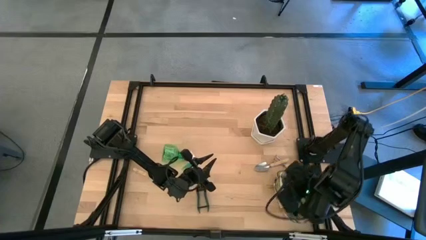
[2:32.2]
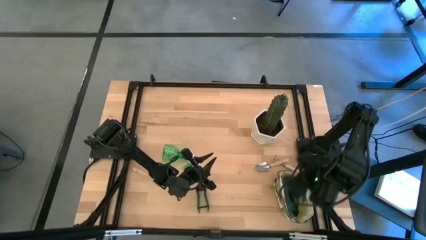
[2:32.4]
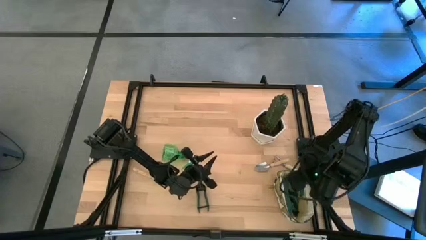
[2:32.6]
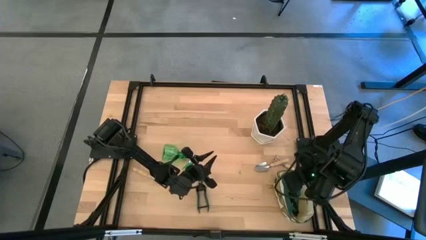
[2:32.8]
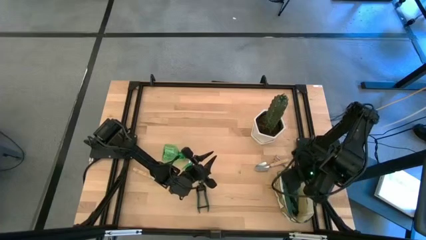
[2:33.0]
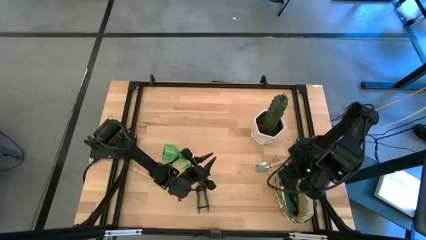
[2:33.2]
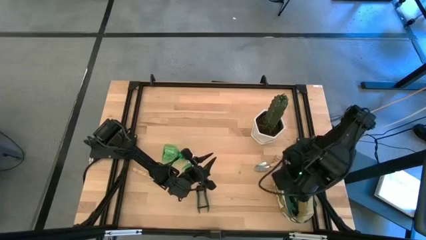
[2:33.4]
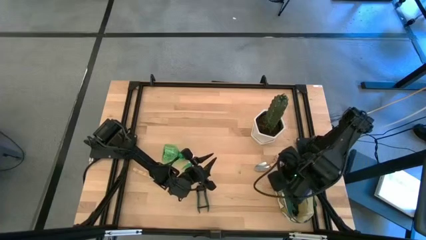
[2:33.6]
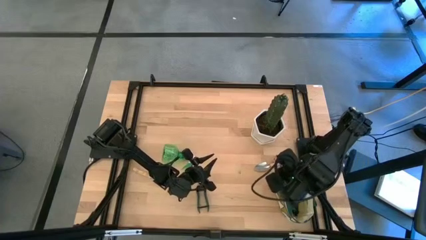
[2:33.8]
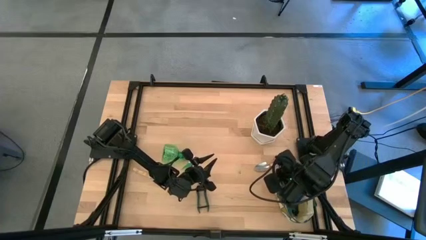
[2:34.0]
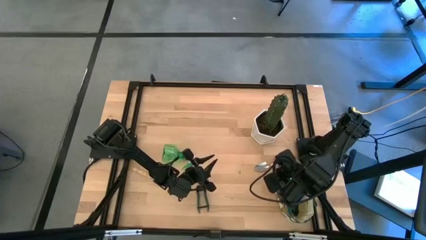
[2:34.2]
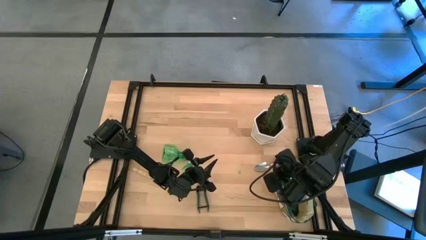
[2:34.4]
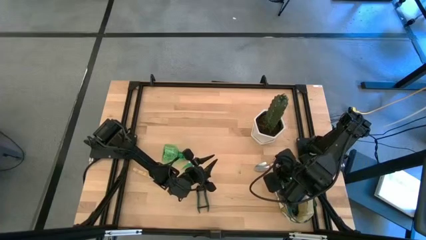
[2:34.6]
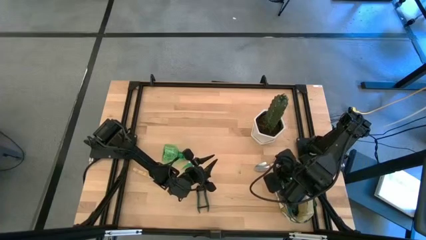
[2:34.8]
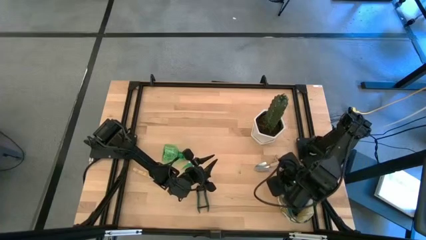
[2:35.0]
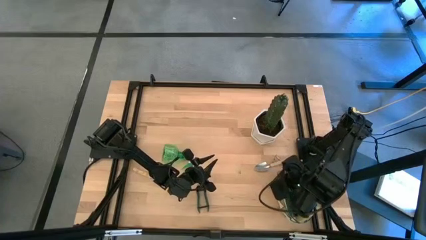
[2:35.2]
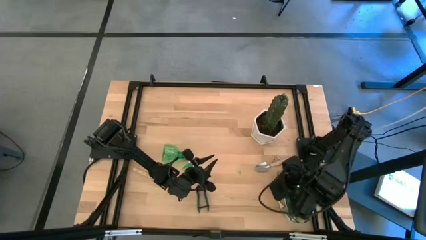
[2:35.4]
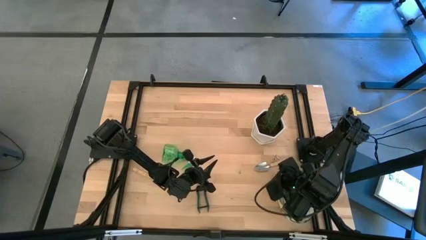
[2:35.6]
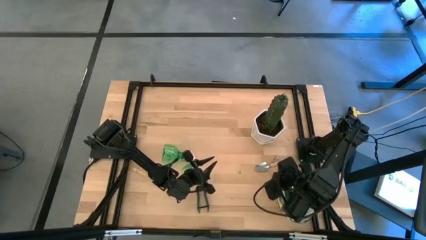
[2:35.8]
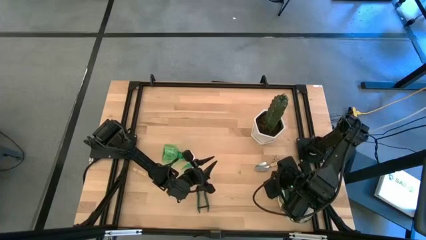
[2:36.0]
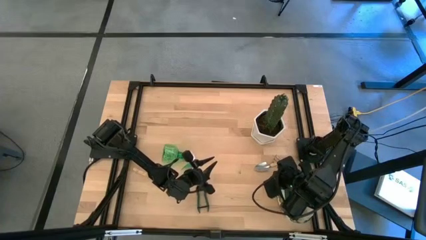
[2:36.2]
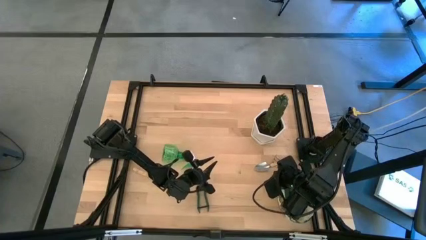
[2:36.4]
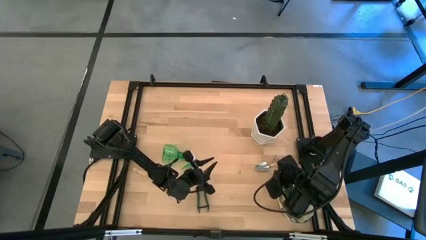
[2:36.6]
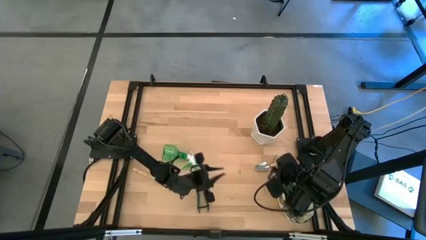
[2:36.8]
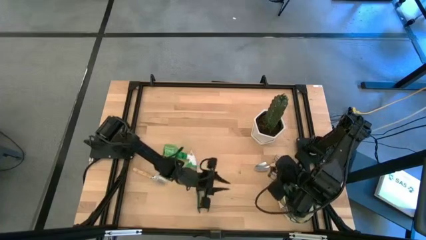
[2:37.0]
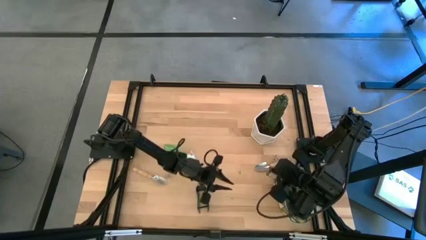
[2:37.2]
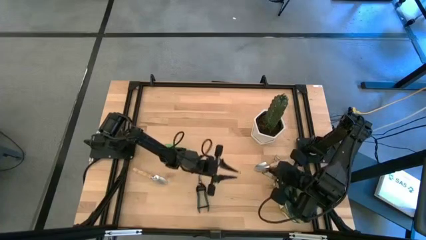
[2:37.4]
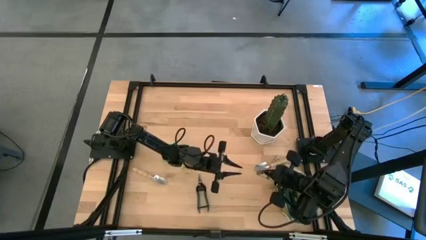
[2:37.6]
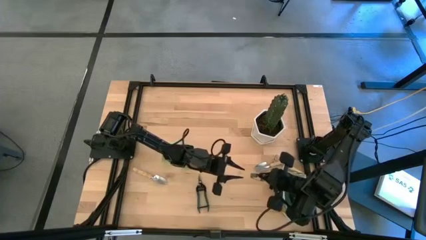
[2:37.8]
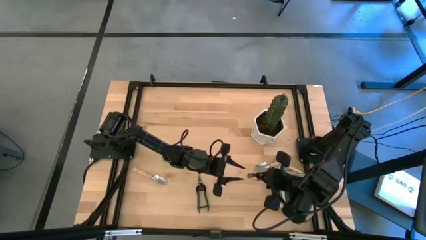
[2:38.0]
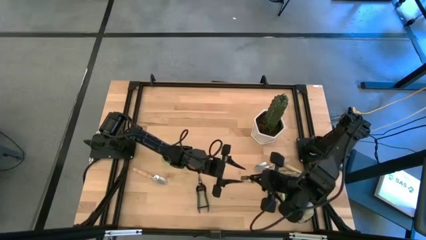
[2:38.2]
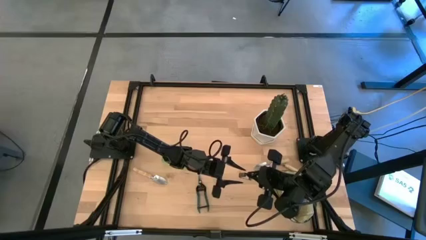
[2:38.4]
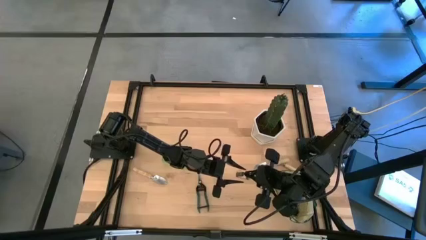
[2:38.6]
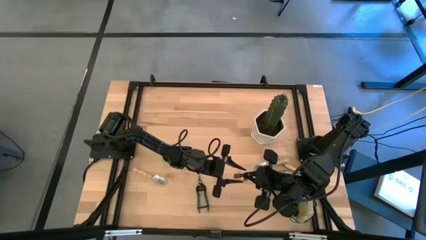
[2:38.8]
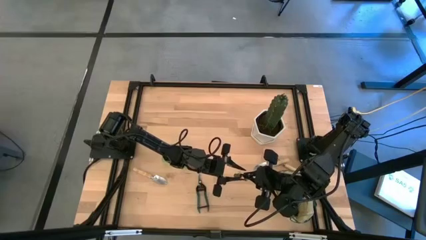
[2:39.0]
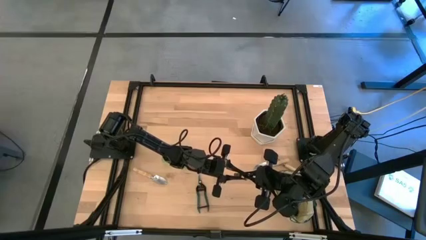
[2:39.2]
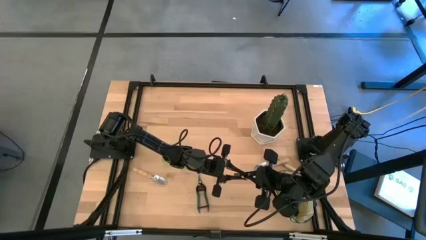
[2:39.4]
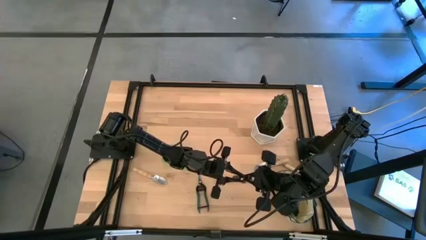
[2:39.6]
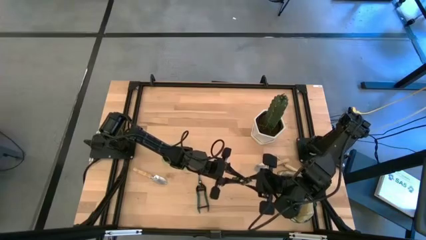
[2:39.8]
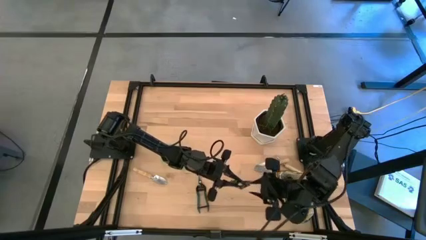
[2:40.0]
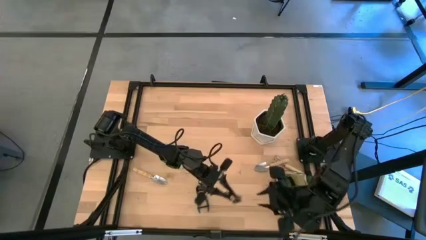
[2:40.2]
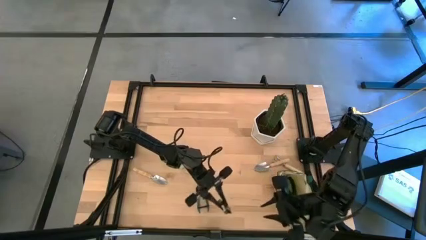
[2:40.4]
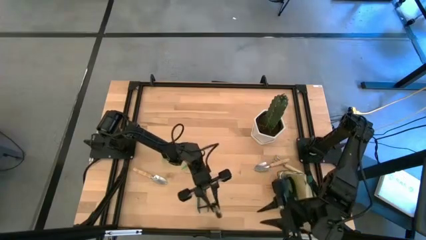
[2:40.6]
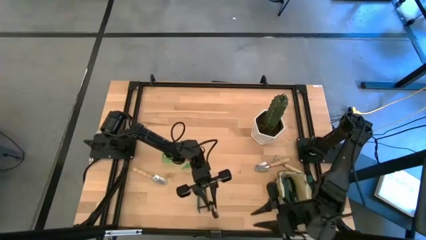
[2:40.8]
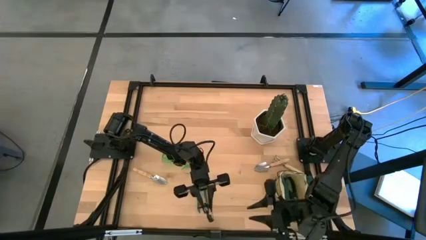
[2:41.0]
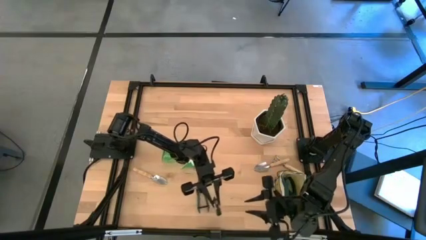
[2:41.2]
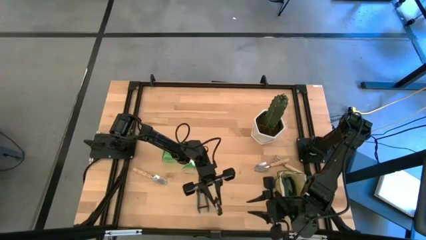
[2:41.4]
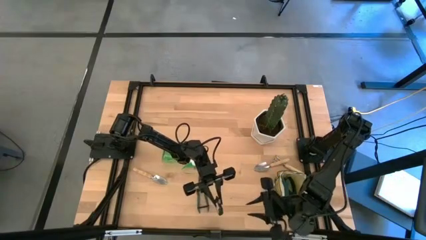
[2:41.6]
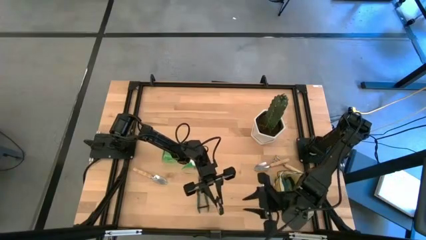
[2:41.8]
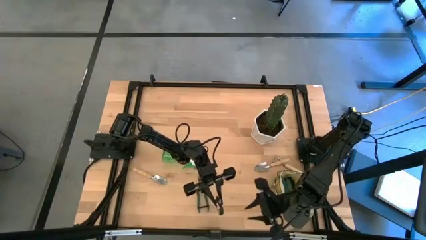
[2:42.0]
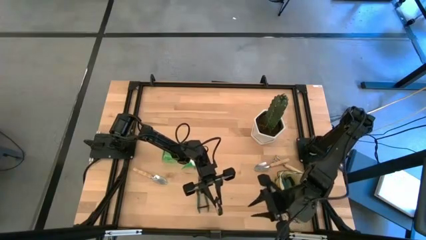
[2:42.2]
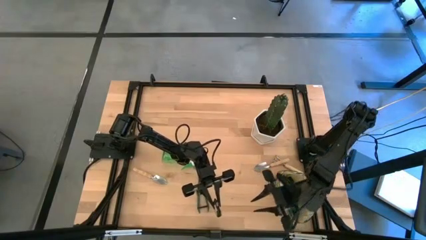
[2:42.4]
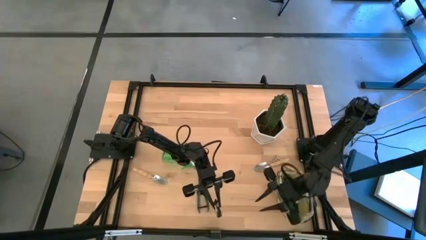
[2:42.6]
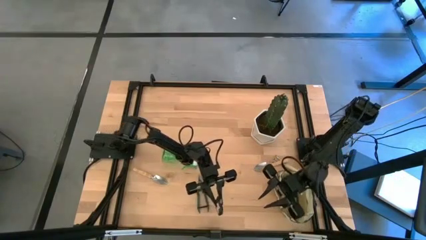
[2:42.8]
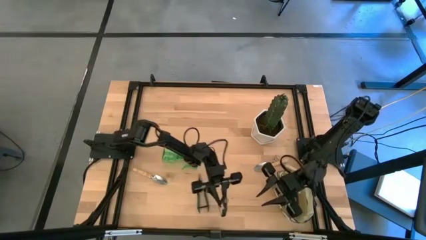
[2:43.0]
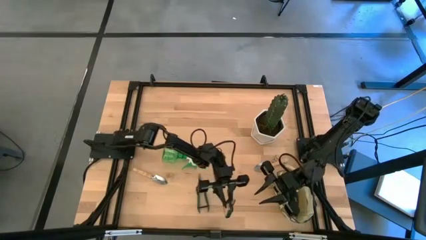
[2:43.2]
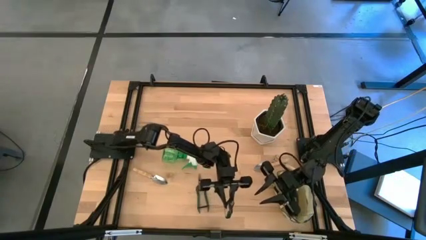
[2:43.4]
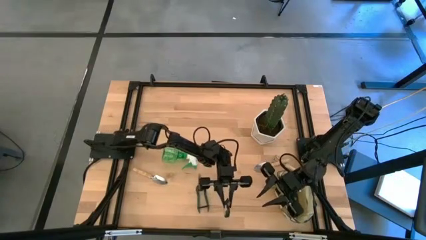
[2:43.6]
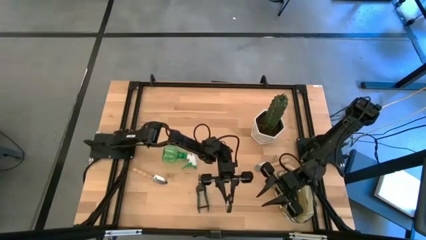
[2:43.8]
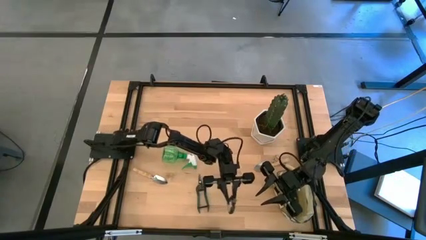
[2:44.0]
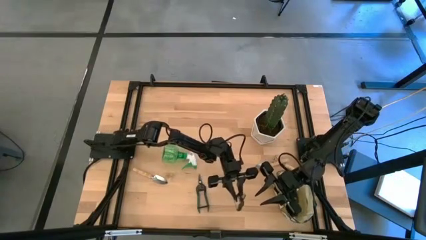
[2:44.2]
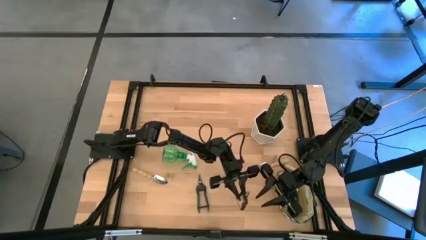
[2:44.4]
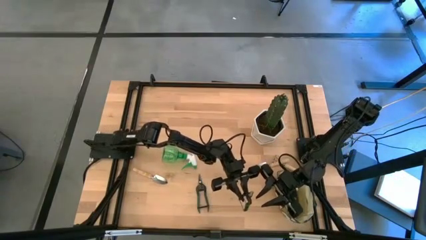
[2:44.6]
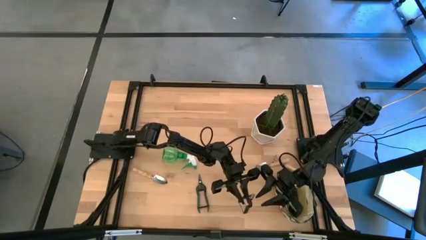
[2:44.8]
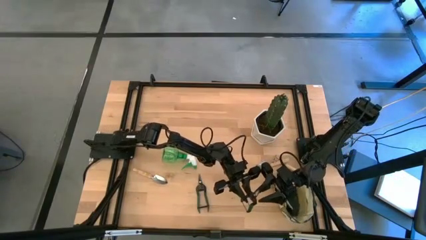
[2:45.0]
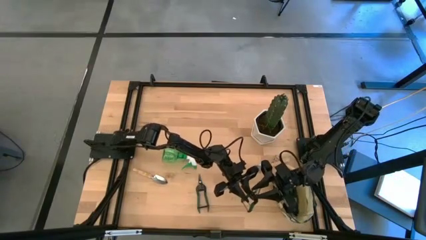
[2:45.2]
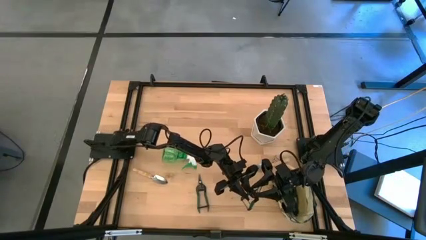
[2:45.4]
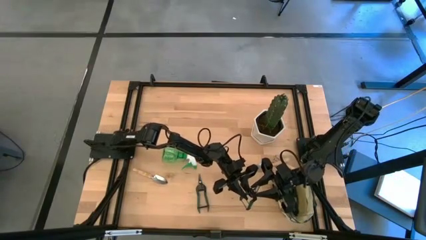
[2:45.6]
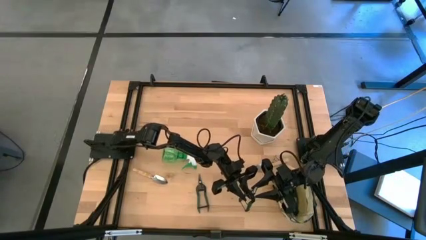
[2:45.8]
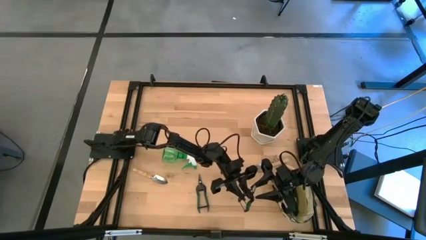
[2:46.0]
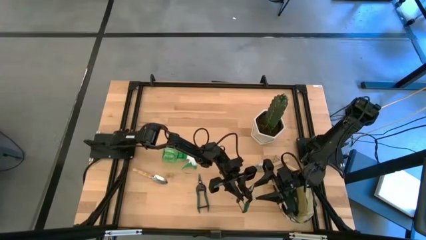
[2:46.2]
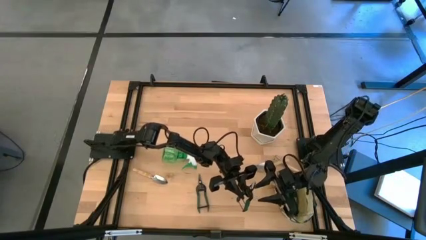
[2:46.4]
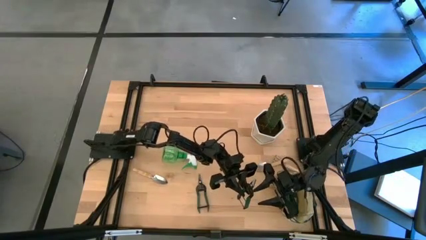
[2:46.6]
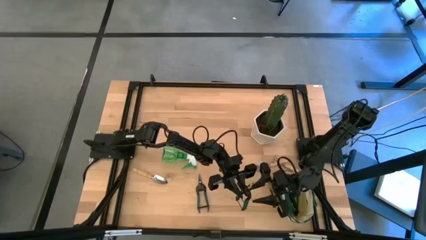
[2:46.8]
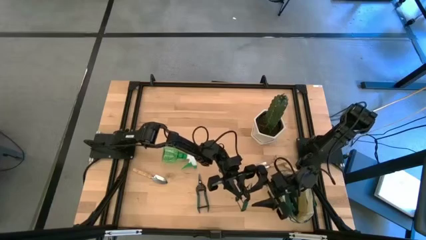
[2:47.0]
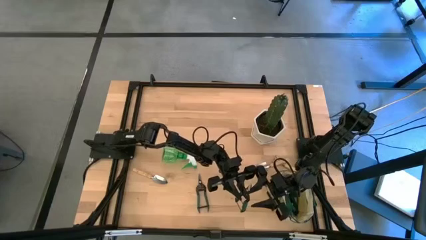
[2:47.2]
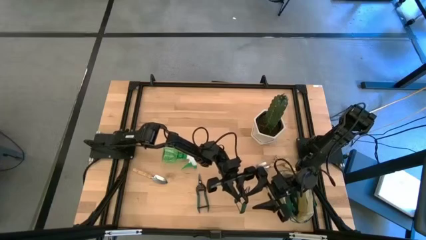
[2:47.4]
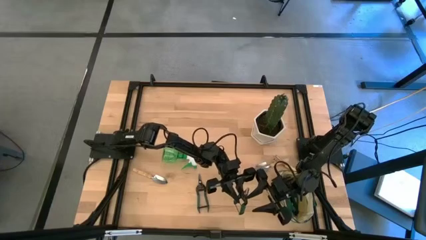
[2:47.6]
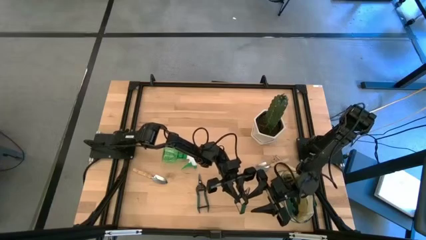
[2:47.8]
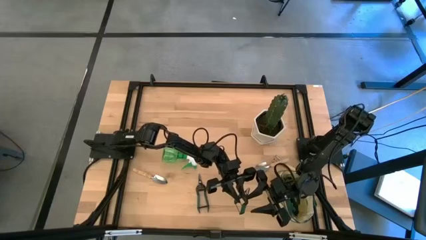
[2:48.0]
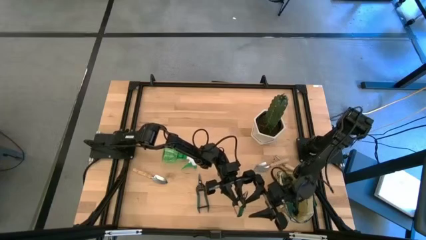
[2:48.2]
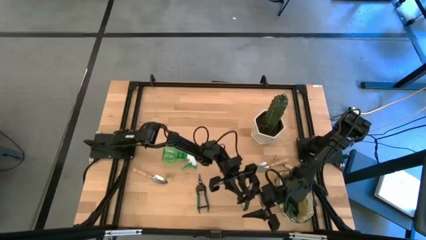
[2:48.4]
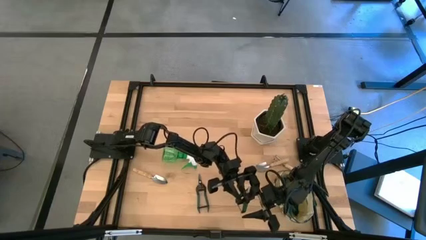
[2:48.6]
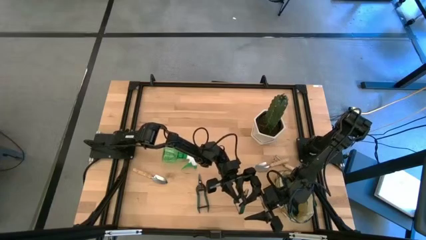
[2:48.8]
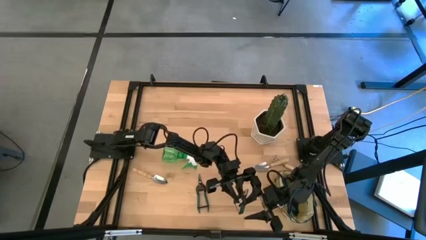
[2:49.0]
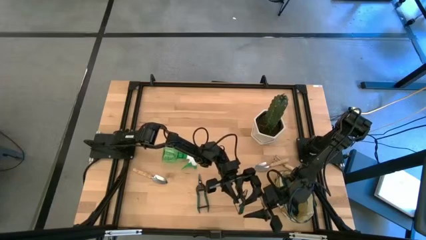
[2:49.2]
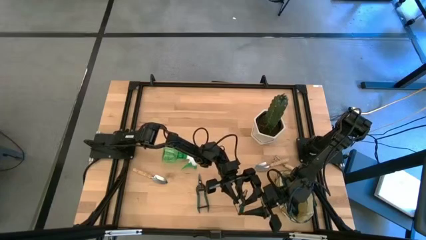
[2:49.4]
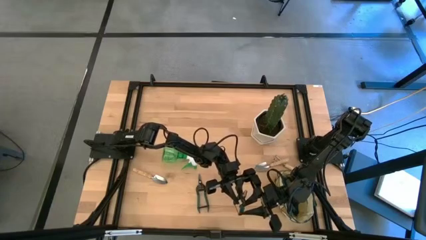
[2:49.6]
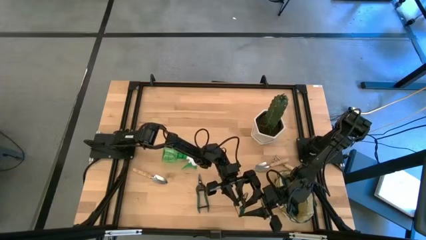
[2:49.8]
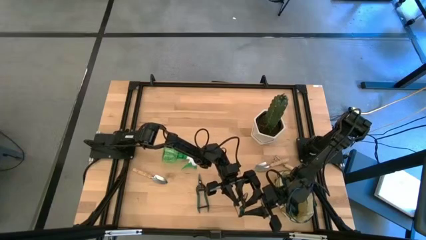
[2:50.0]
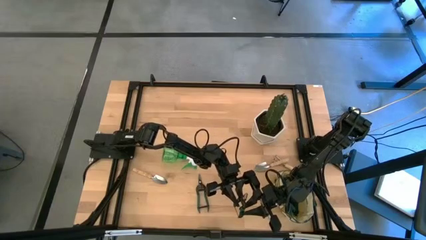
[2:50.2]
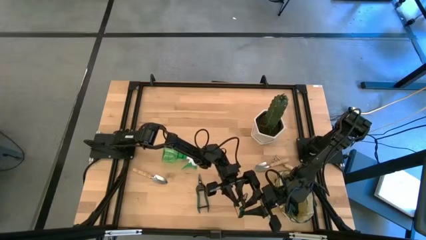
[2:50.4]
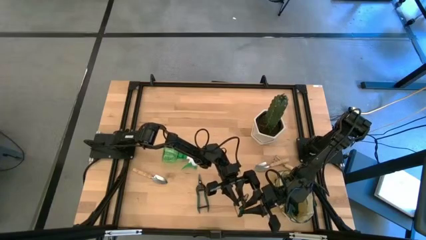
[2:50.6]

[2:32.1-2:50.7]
Task: Pick & Place Garden tools in Gardening bag
Put the top grafting pruner into the side pocket of the white bag
